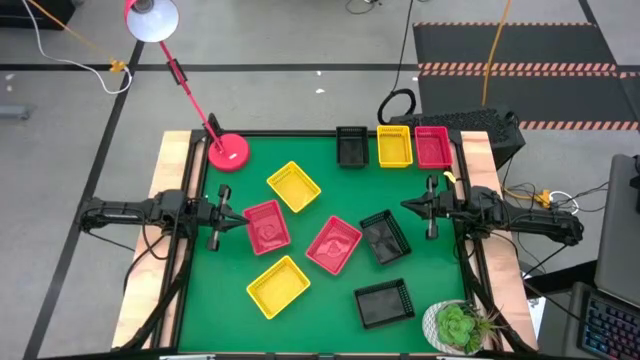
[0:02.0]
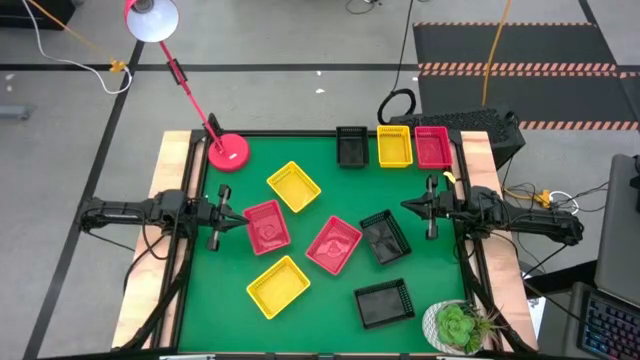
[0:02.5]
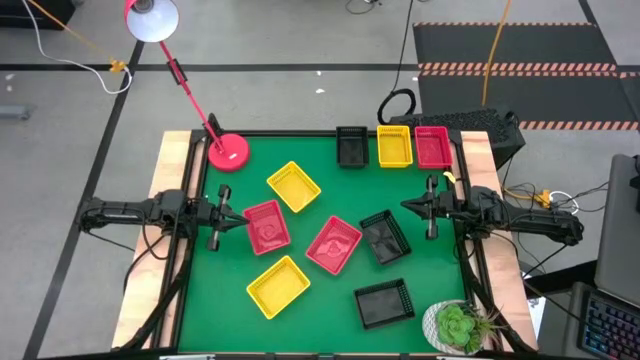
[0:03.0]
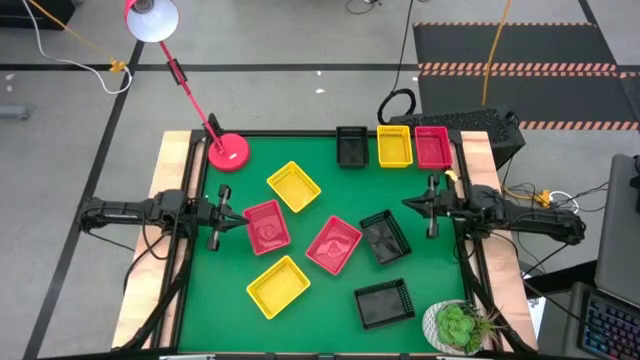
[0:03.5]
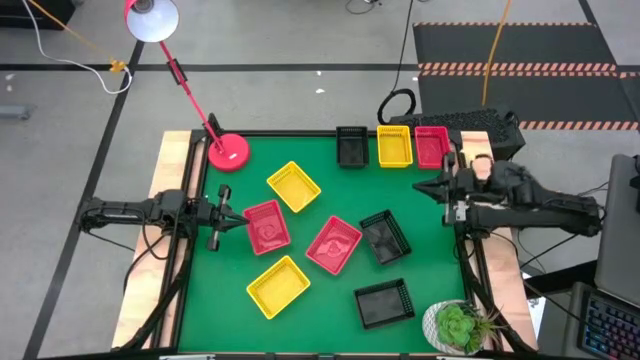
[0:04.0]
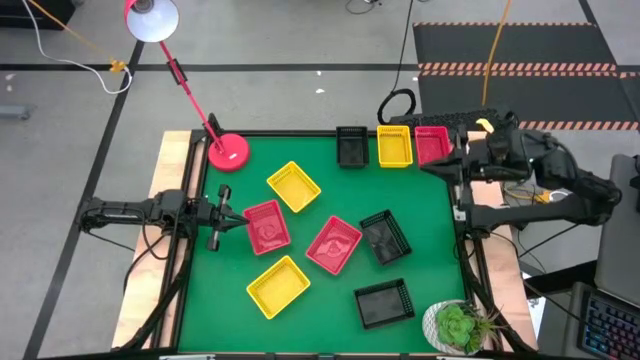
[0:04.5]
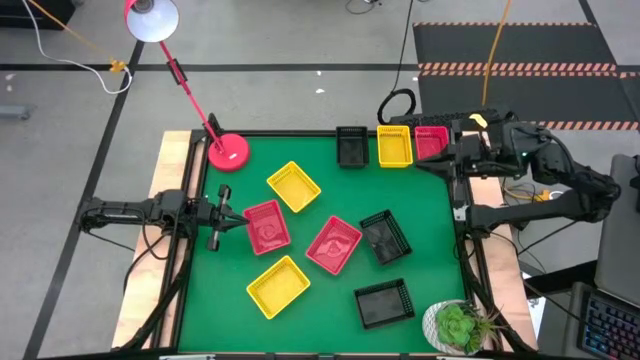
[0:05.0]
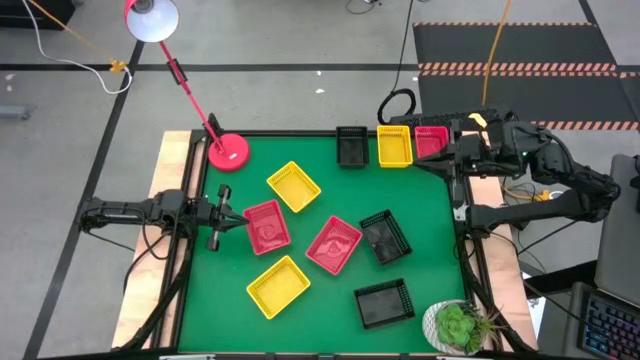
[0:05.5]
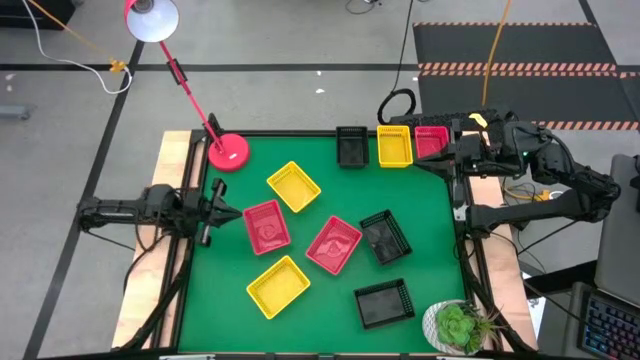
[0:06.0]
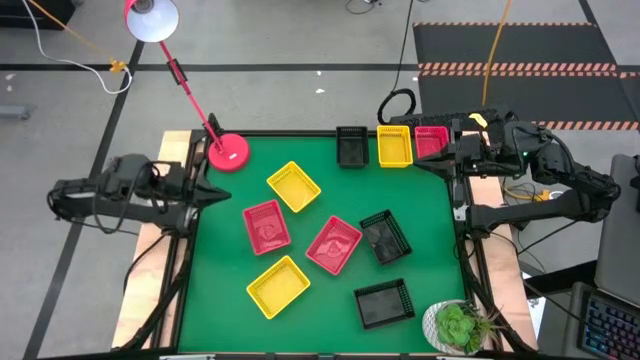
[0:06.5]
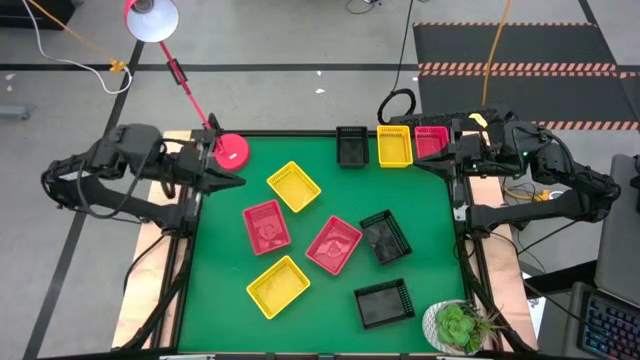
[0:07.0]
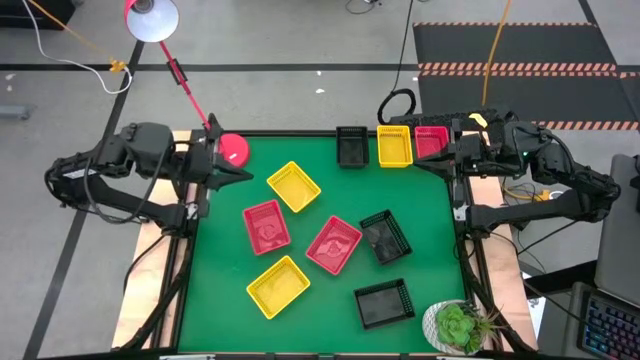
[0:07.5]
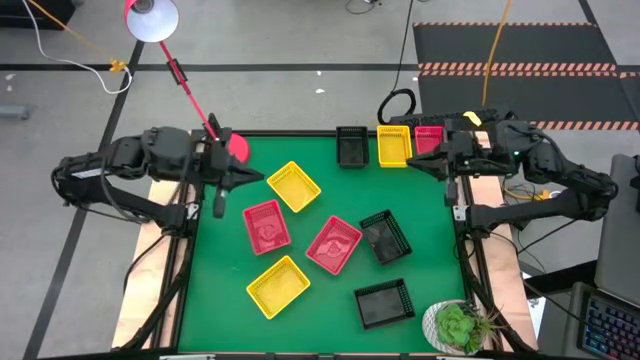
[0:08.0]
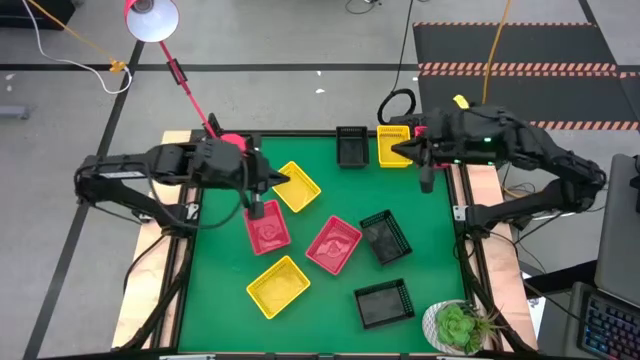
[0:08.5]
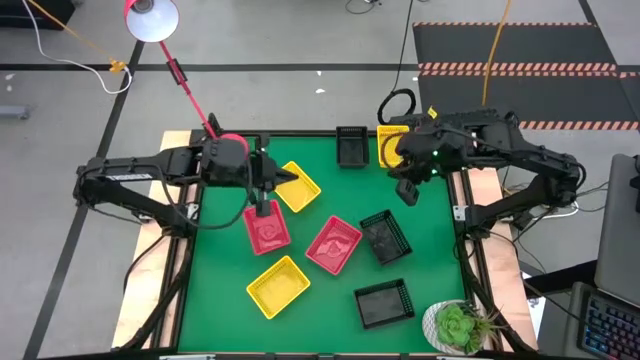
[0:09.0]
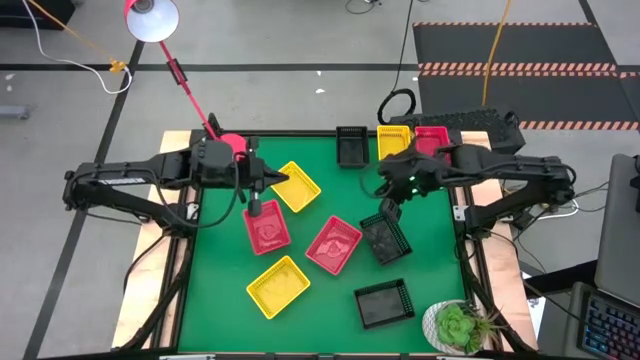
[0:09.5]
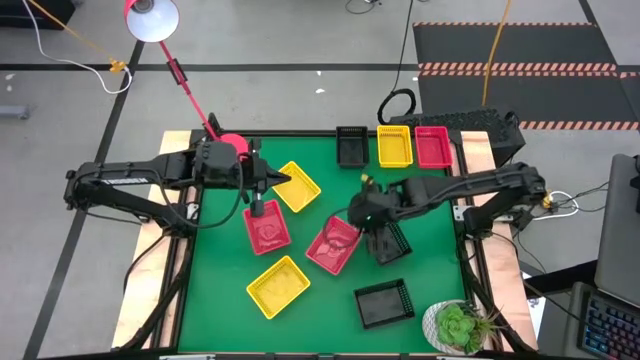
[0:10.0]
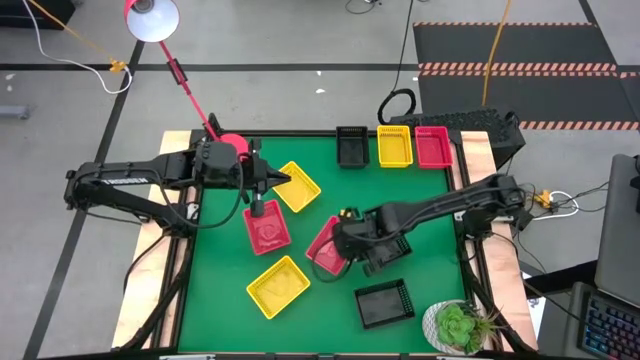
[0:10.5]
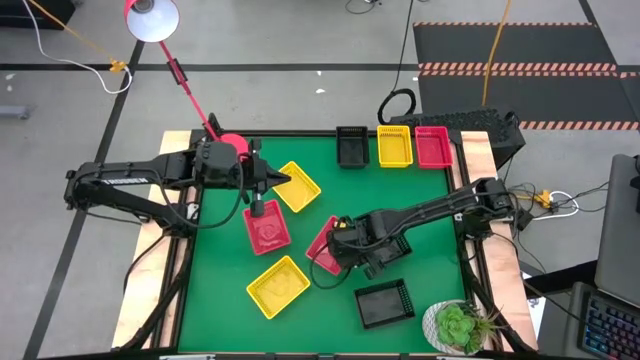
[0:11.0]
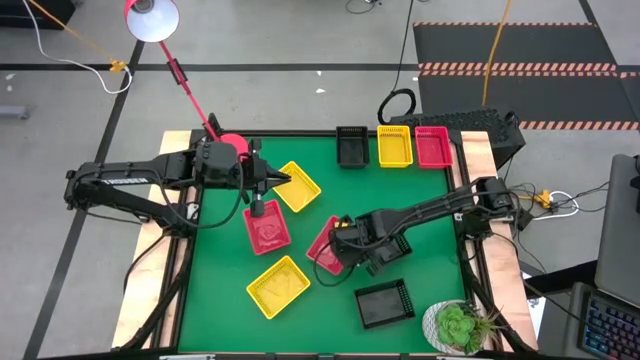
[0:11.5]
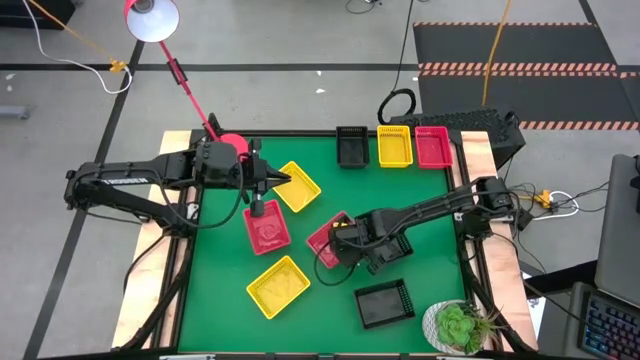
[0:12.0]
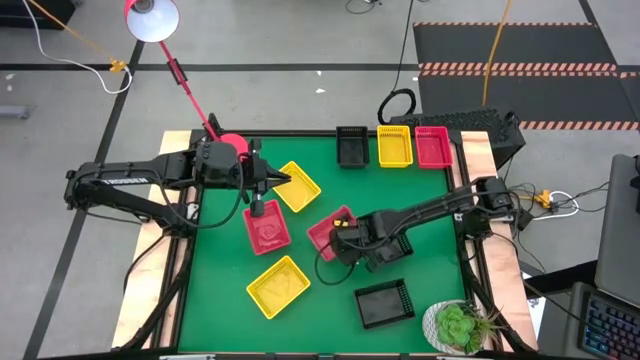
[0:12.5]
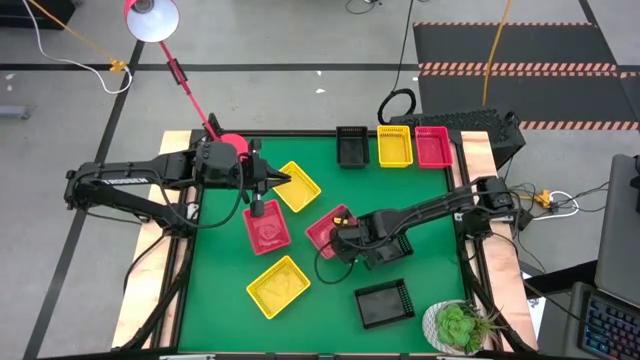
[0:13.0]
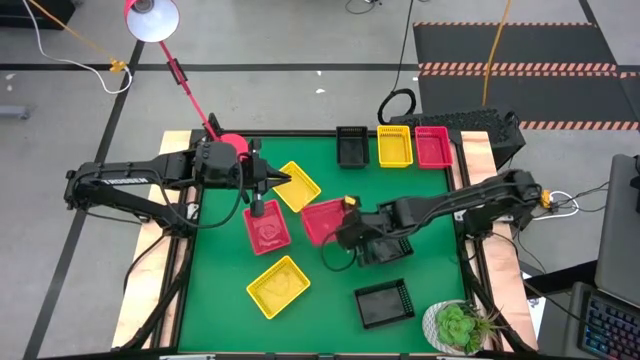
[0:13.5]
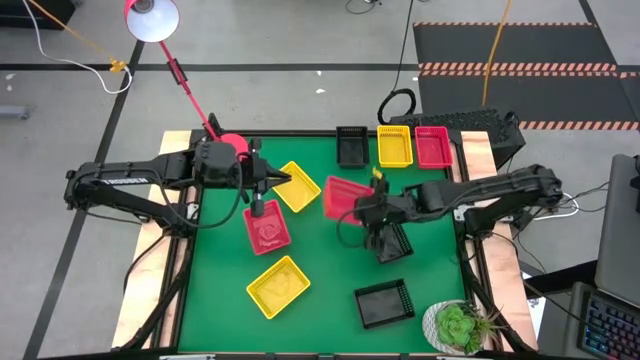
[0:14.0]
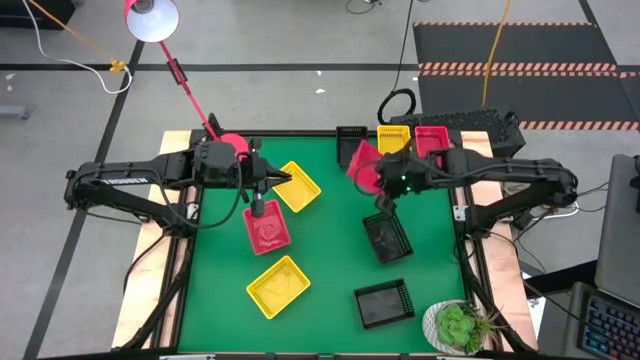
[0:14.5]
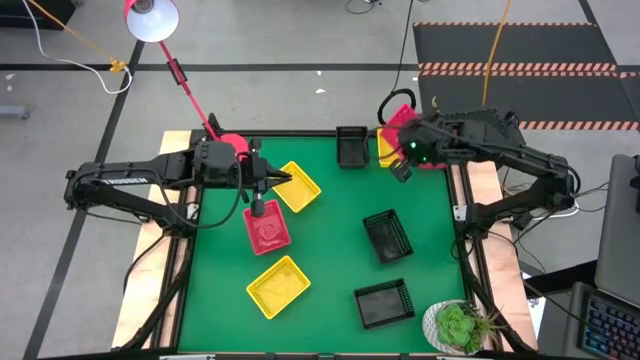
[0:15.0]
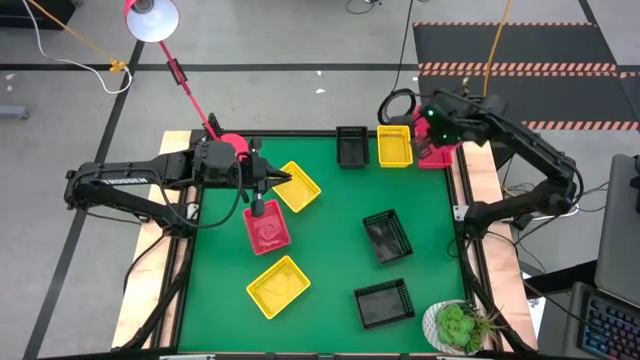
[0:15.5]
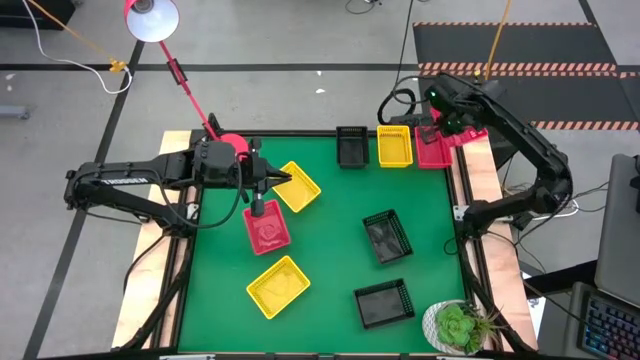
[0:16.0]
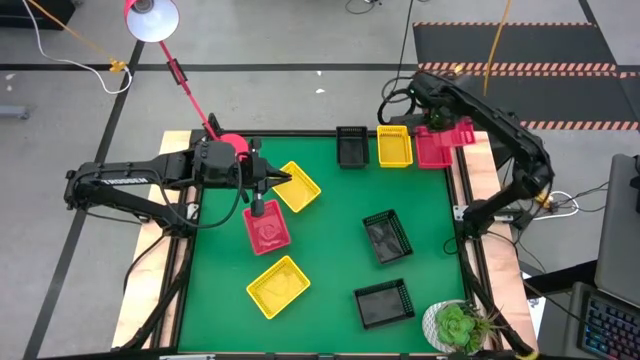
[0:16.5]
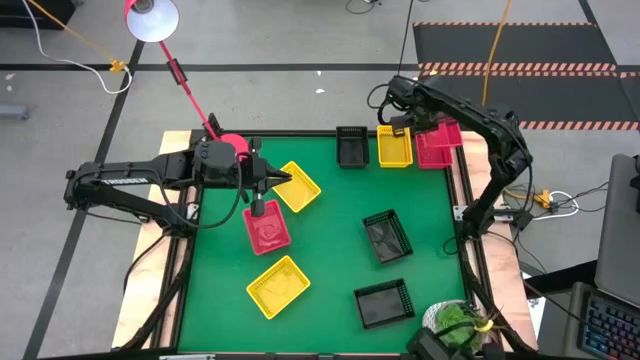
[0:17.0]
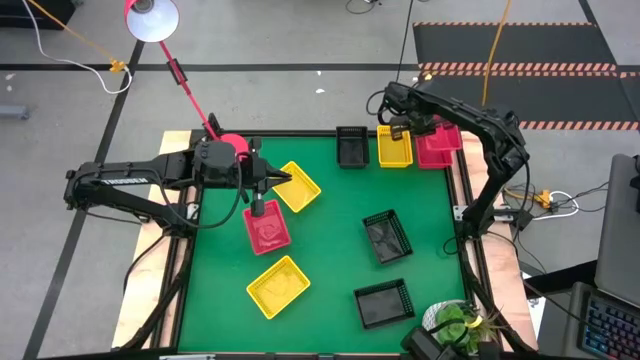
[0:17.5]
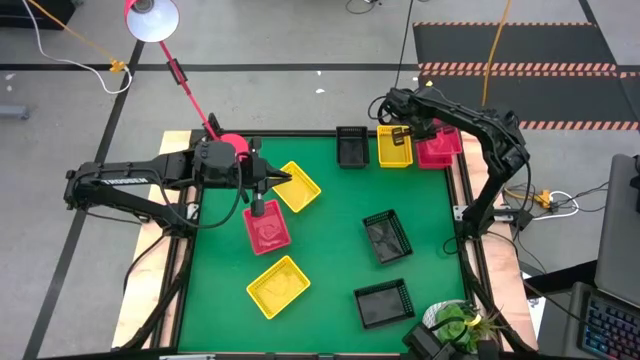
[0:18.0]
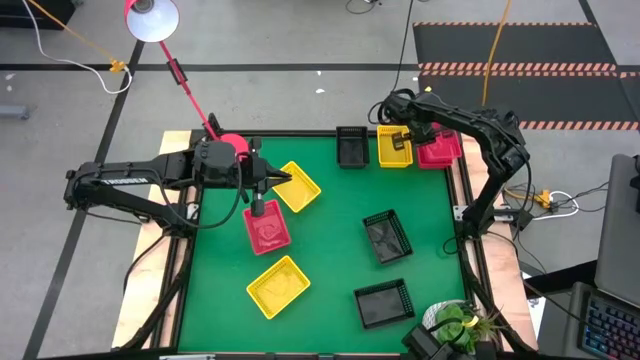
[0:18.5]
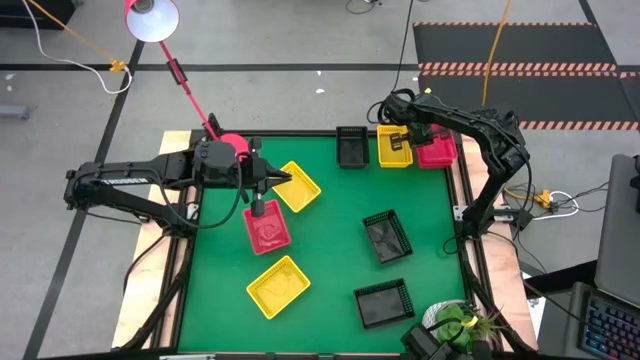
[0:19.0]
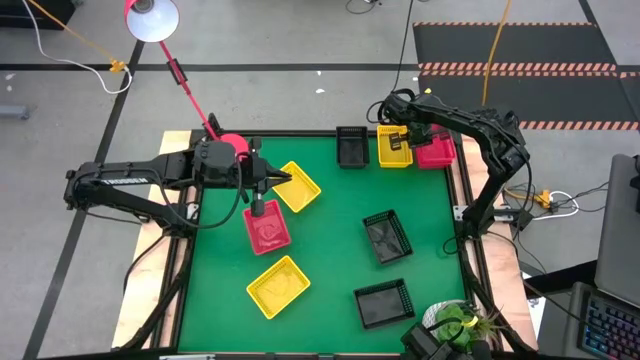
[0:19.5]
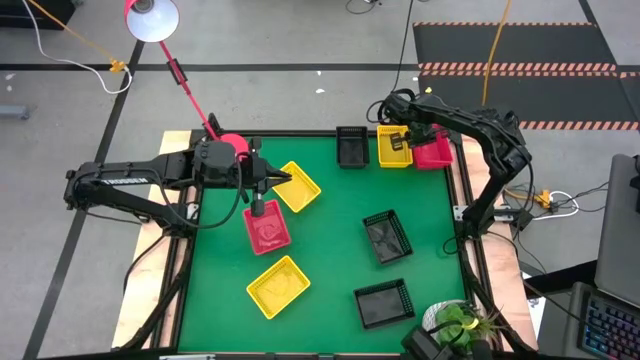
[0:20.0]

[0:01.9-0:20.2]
Stack the bottom right red bin on the top red bin
